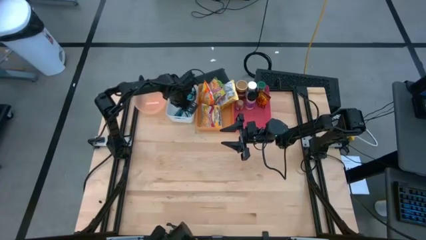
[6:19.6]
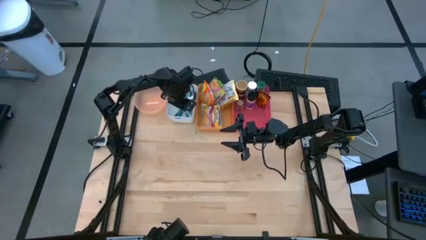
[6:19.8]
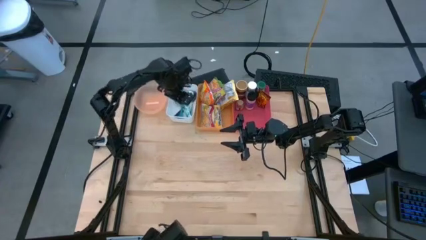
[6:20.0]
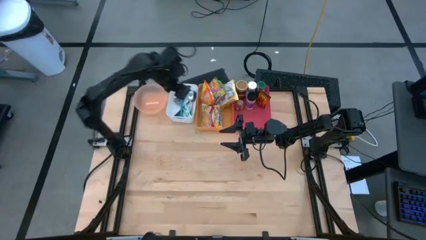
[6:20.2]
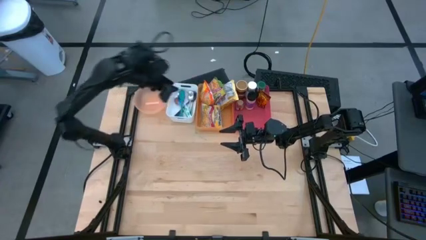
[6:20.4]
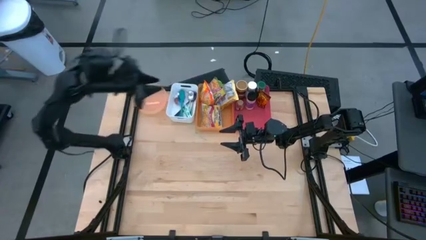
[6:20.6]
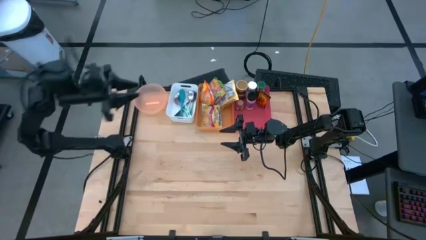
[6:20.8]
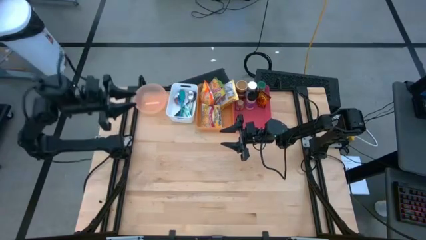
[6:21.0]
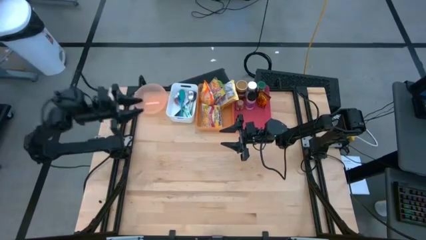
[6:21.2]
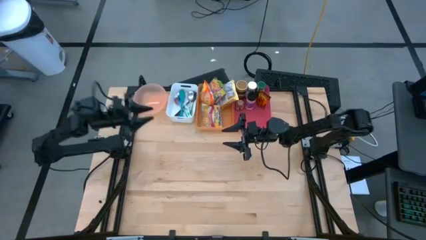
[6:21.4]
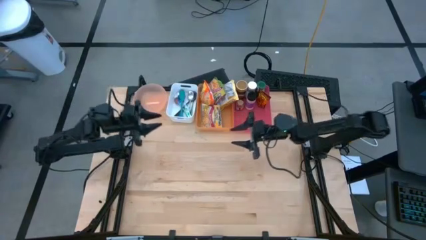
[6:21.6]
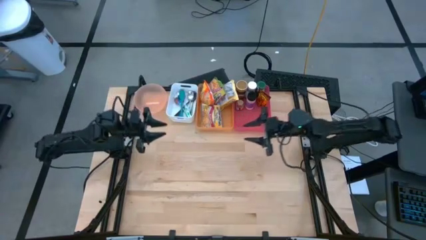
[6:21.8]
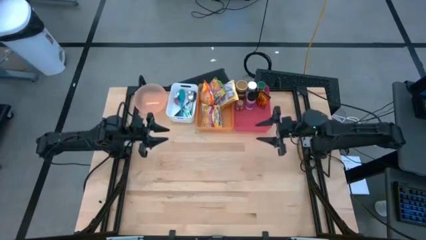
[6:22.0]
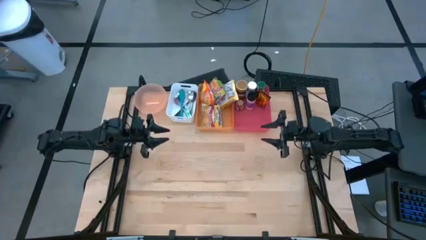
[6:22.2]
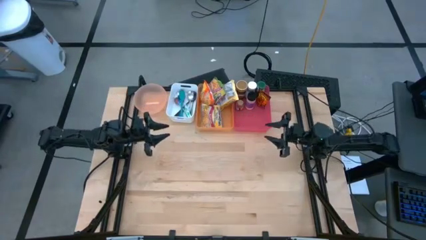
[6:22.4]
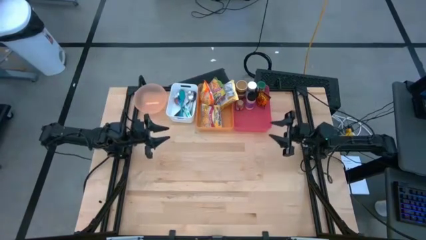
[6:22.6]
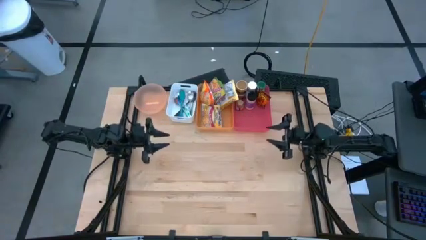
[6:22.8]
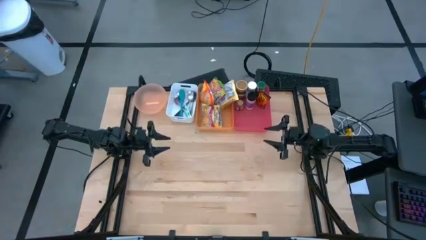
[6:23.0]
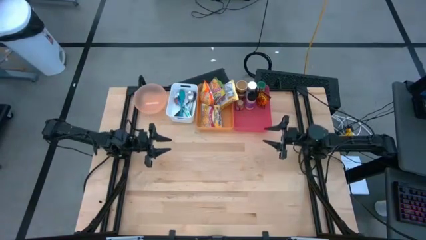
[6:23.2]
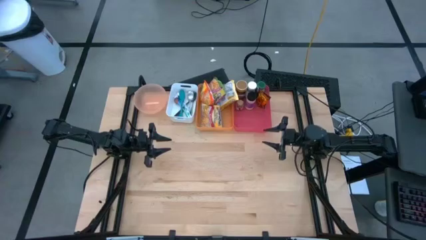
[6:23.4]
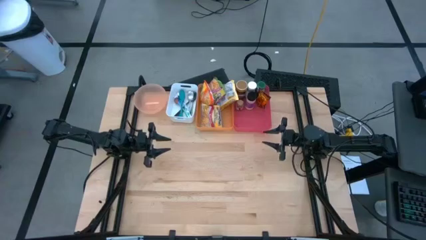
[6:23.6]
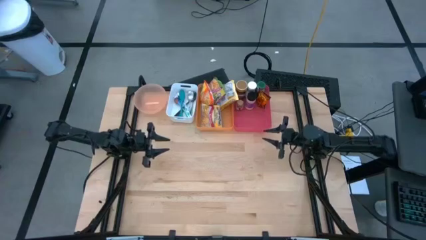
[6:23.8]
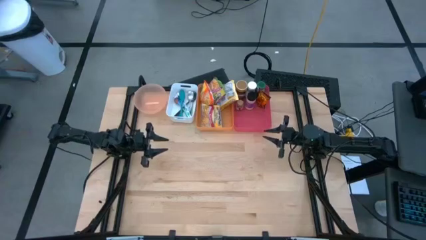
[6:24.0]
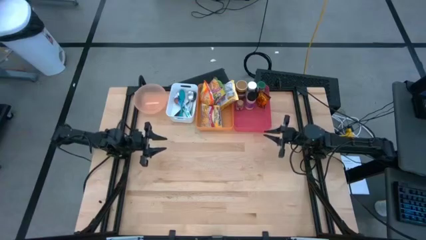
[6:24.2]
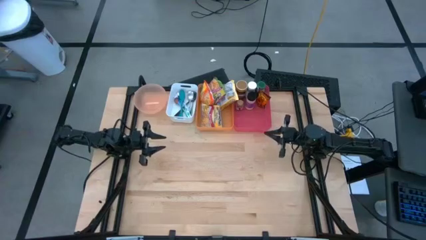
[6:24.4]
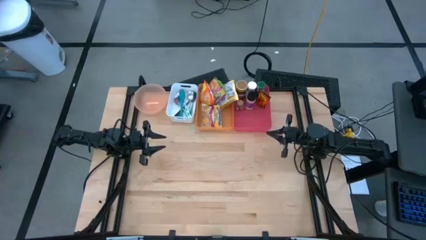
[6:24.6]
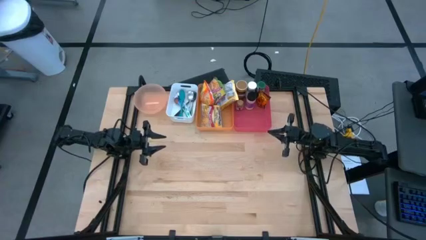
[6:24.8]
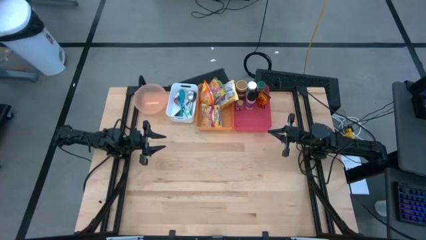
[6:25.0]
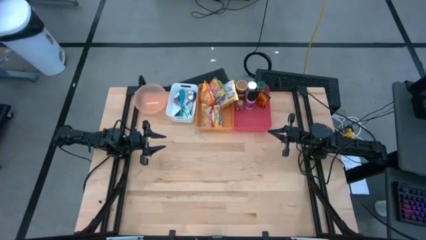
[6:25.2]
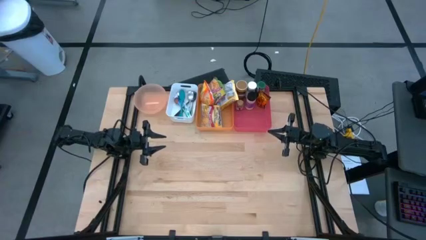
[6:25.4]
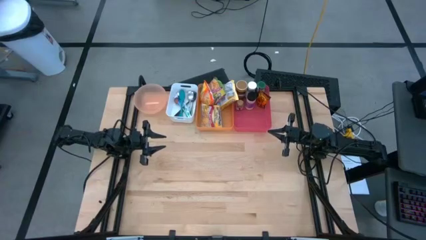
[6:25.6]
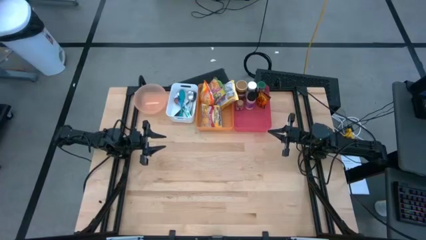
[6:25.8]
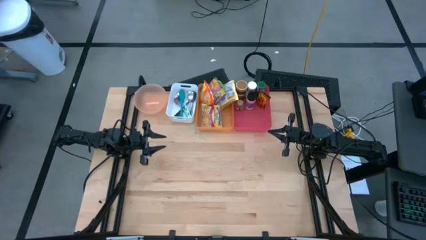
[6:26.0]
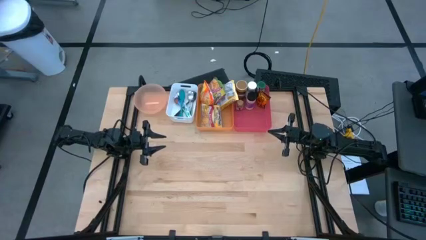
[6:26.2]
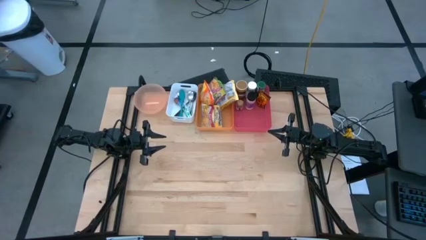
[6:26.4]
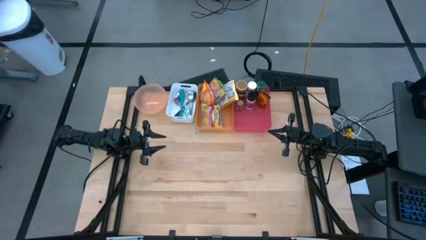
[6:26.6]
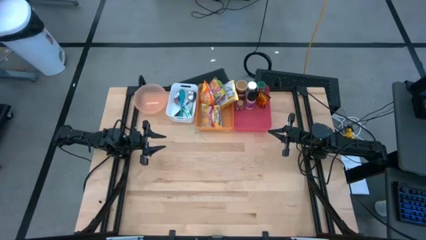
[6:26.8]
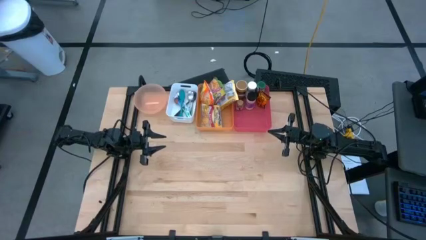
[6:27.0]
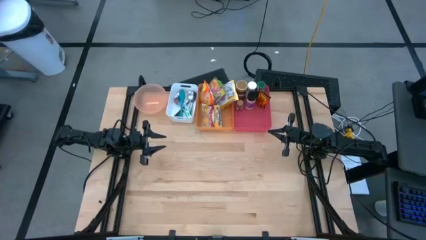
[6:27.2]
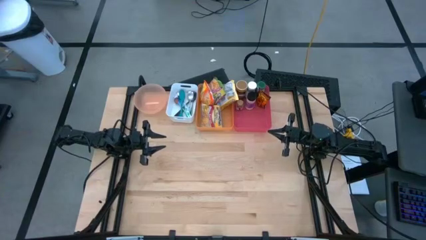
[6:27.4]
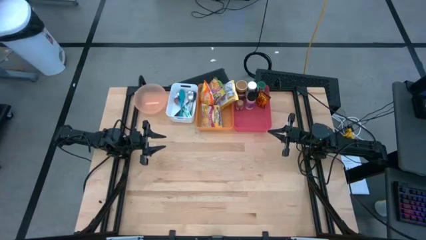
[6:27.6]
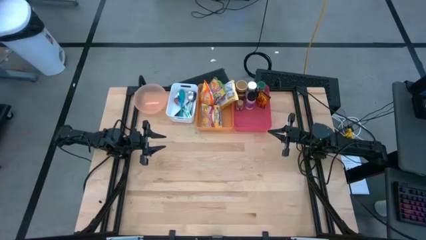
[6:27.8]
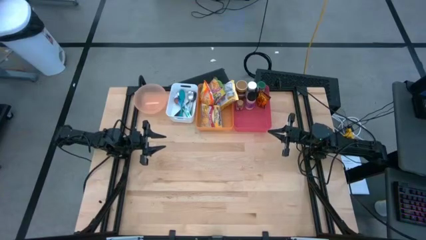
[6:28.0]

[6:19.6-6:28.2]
Task: Pick & Place Food Item
Return to Home Position

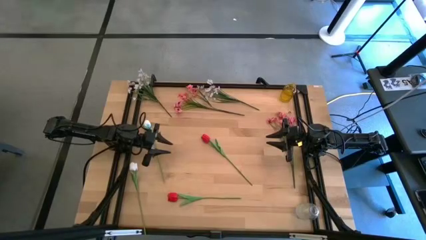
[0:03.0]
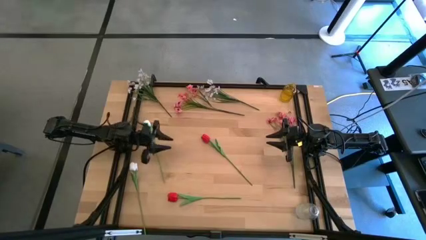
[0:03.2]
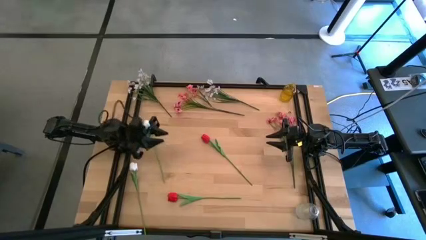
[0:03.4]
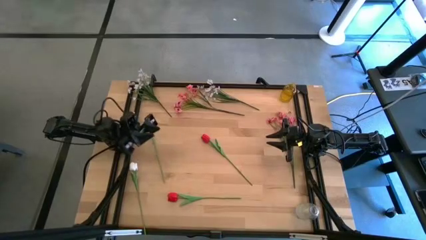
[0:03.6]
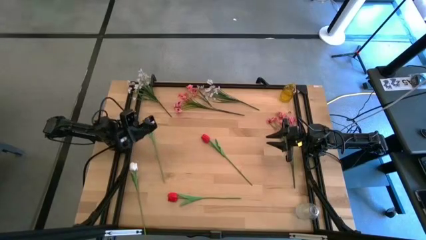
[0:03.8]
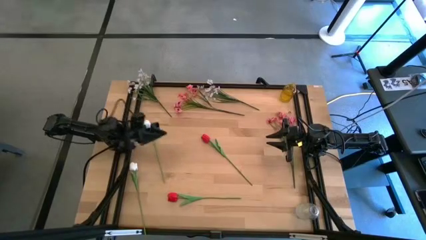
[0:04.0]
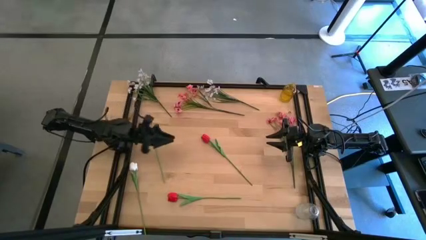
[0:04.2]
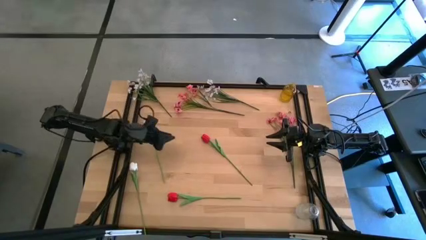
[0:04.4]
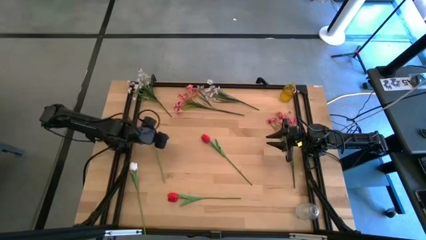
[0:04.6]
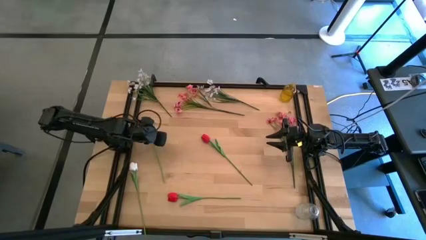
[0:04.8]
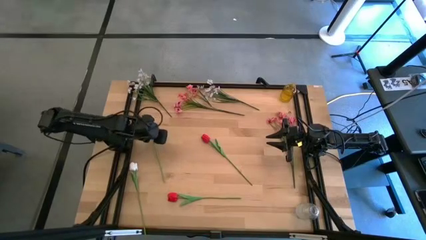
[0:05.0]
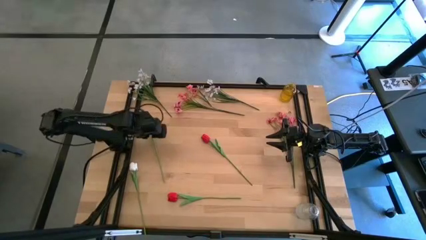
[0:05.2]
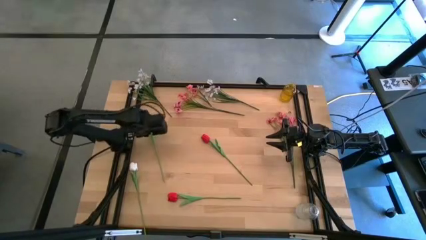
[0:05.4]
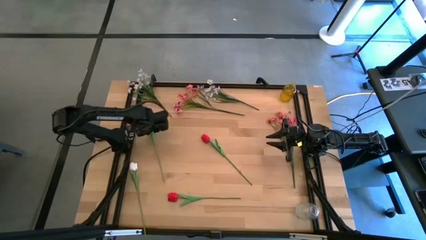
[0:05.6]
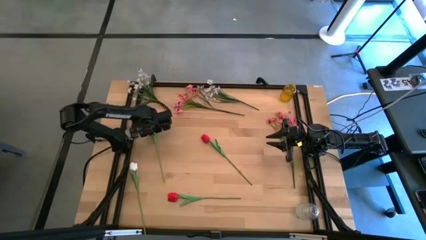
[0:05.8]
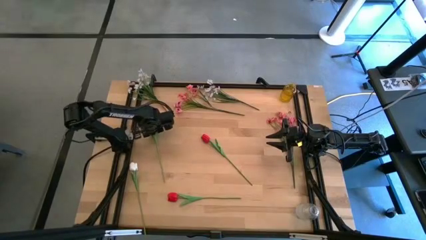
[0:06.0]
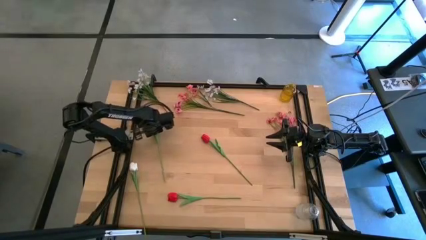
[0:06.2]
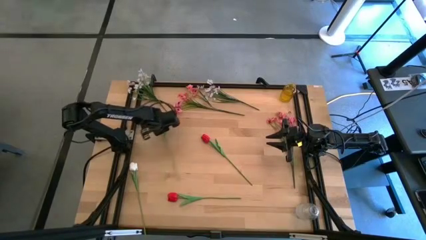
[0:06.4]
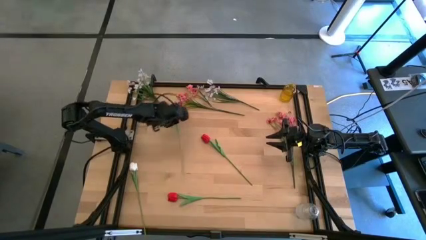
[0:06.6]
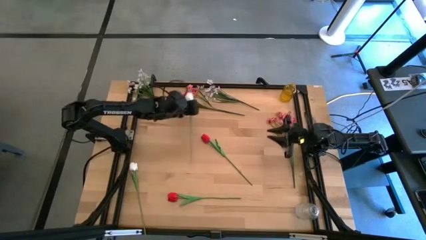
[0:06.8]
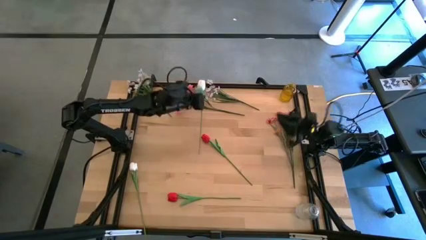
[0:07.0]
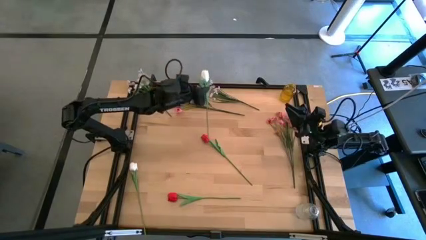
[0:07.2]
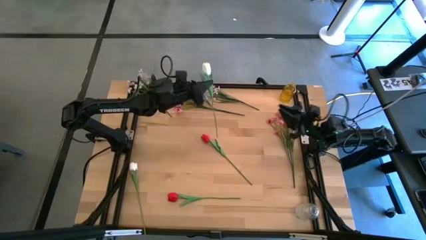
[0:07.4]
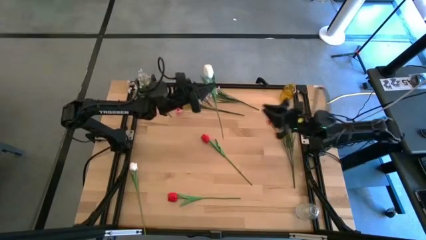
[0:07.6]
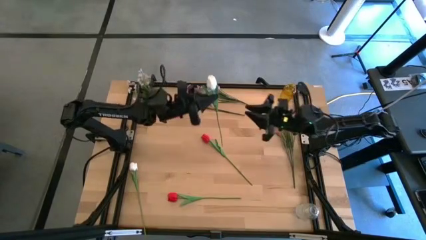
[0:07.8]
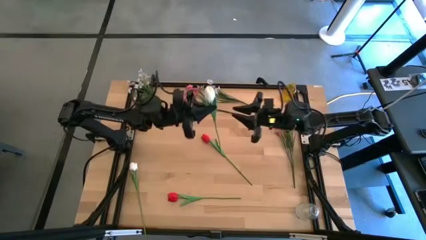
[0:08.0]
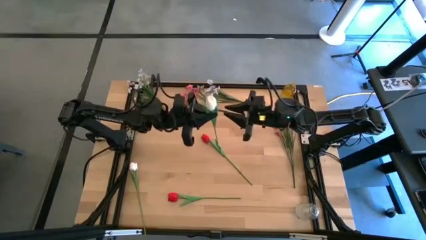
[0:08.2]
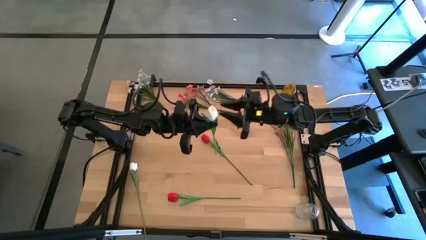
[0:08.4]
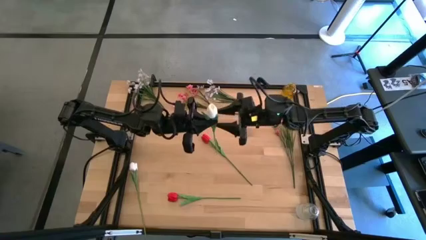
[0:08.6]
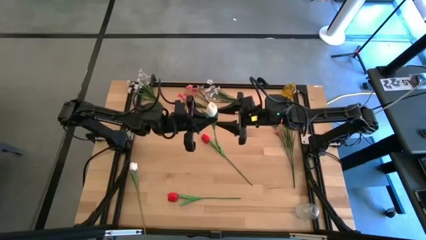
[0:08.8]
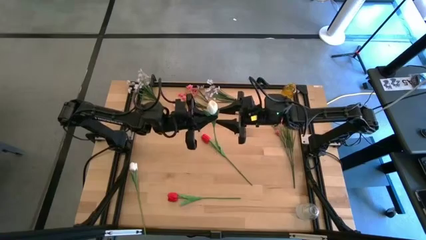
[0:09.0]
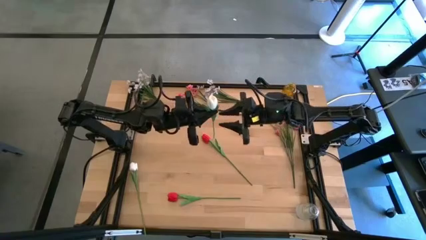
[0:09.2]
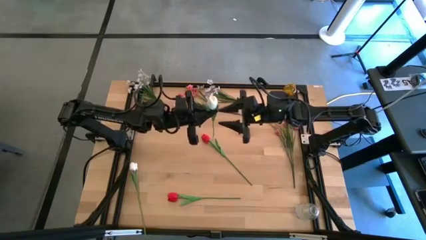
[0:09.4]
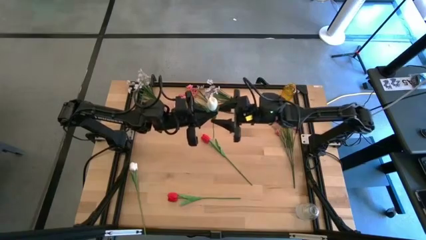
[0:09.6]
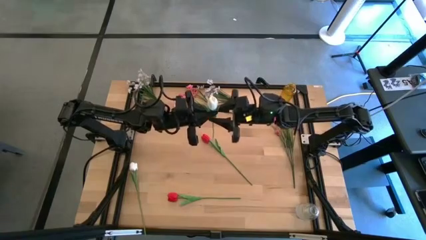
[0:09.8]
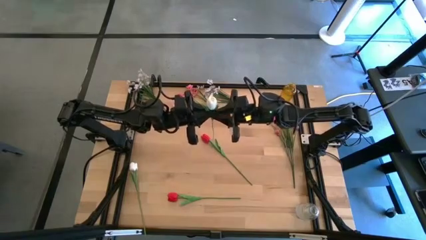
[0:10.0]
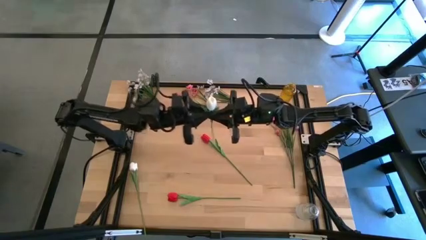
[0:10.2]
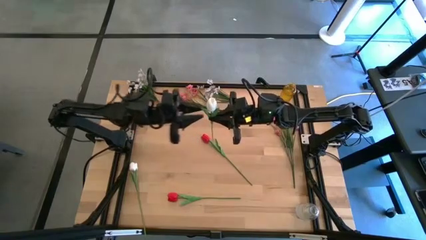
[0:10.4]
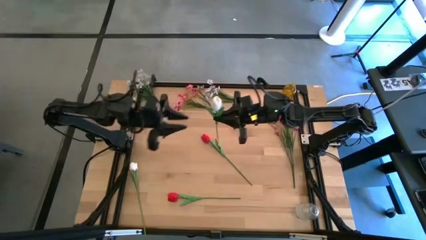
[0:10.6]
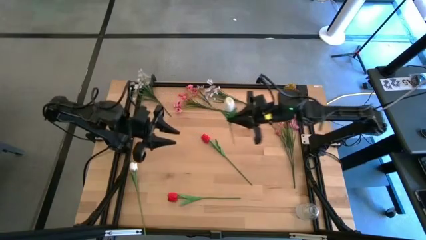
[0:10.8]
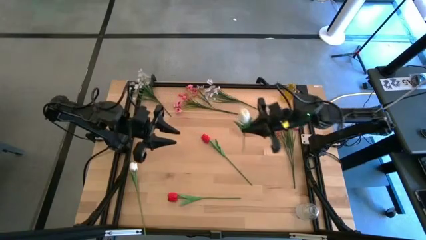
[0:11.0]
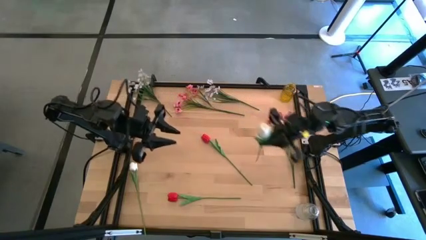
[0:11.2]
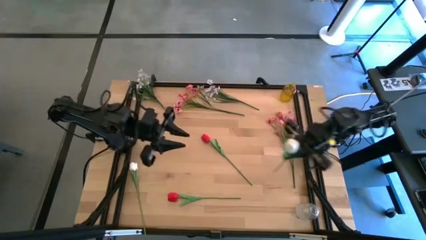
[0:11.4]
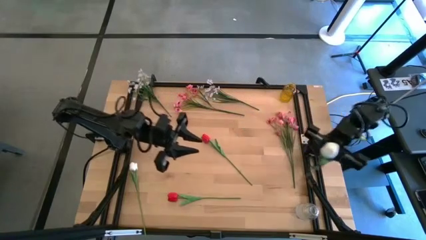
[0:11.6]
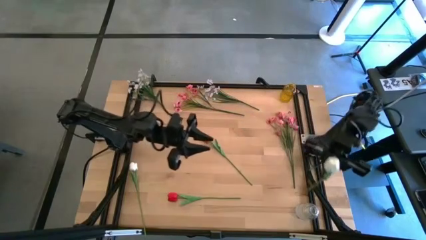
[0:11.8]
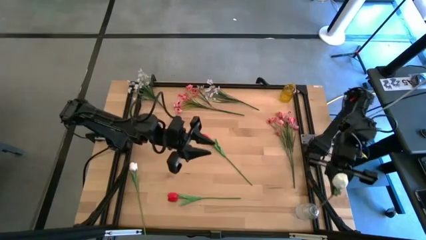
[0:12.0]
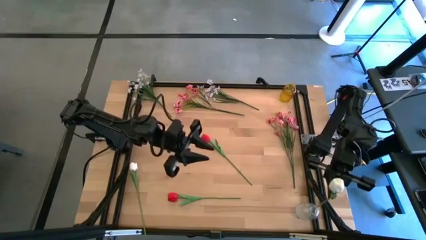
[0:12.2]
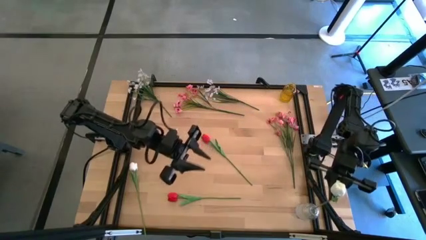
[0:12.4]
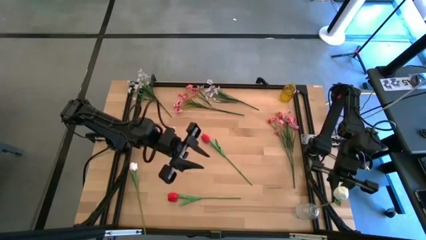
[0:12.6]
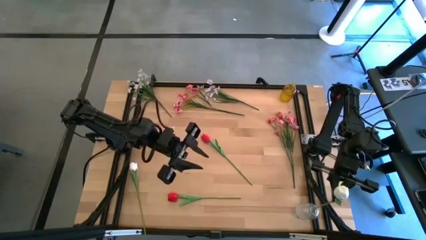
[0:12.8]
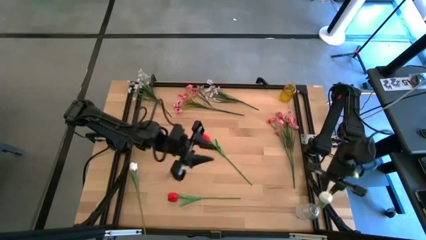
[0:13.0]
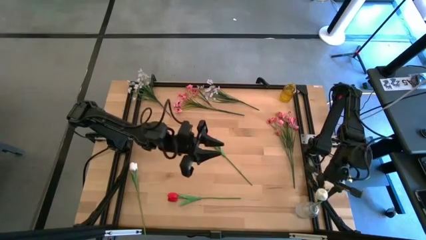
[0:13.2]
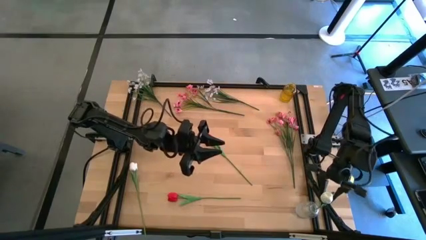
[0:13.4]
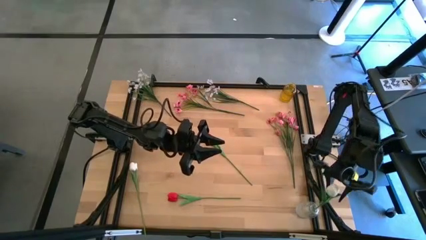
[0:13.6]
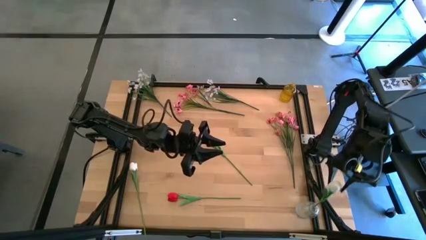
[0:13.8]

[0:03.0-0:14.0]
Task: Sort flowers into vase by color
Put the top white flower into the transparent vase
